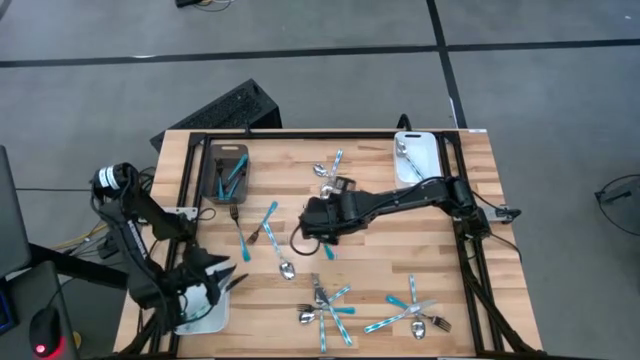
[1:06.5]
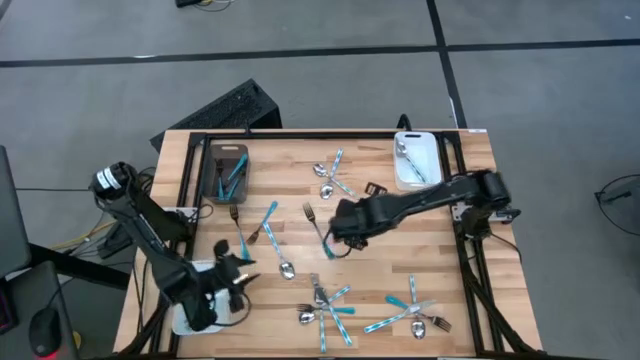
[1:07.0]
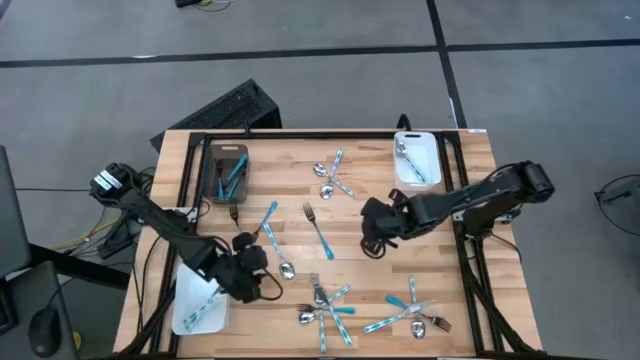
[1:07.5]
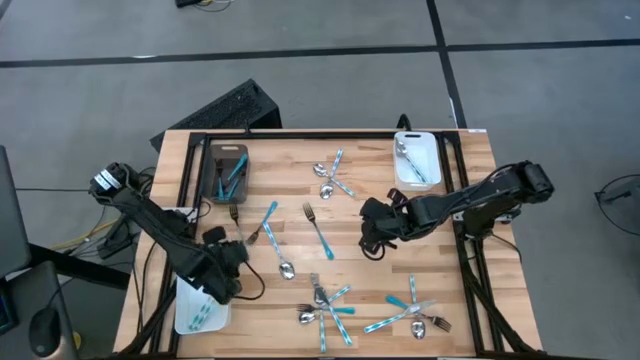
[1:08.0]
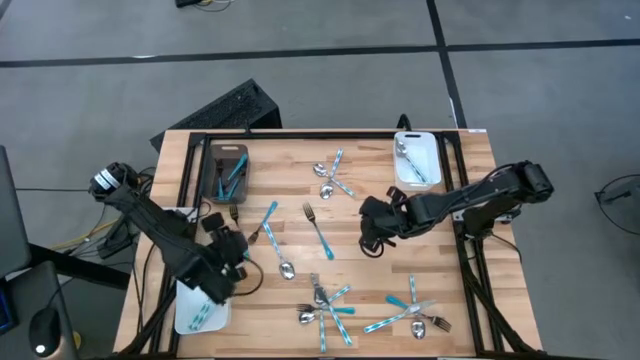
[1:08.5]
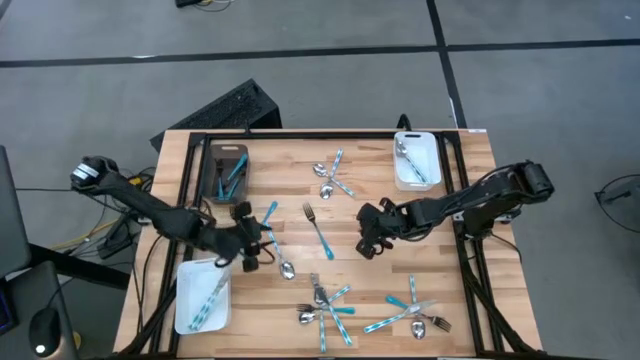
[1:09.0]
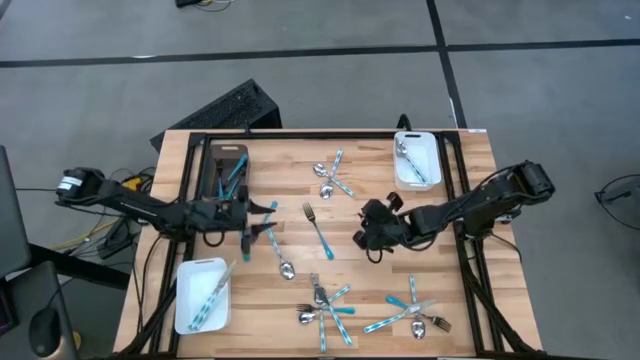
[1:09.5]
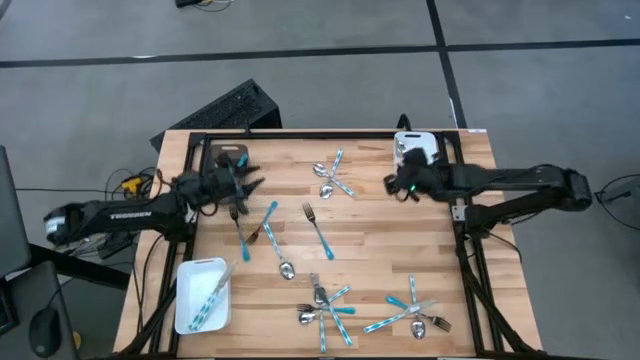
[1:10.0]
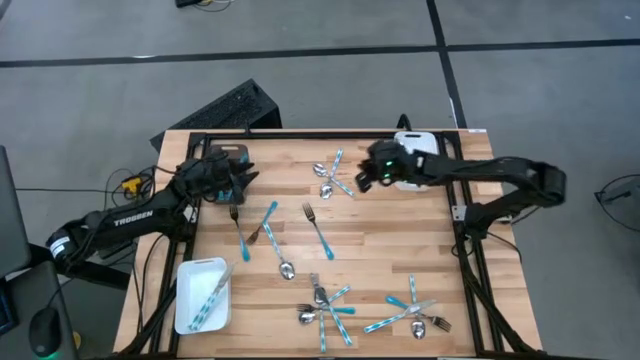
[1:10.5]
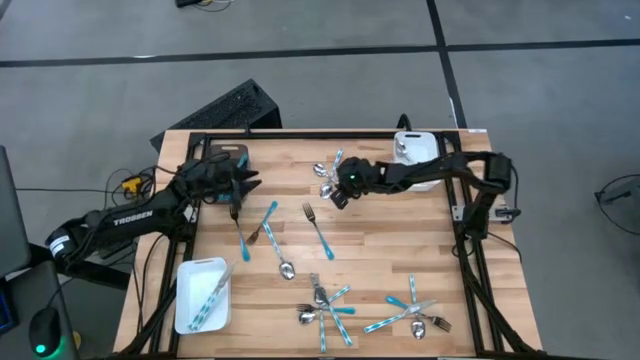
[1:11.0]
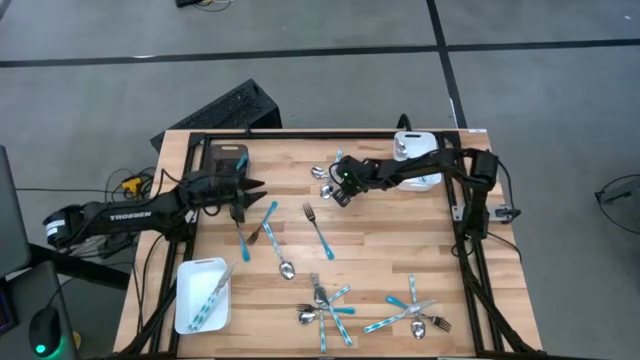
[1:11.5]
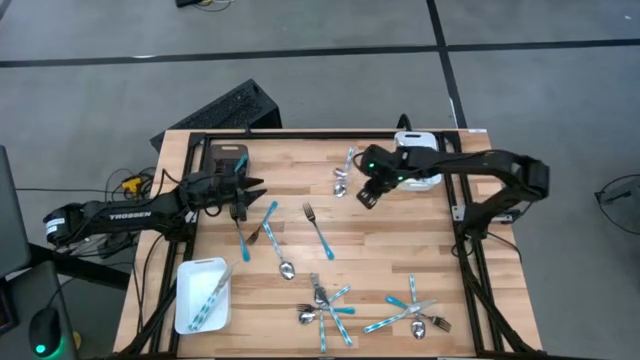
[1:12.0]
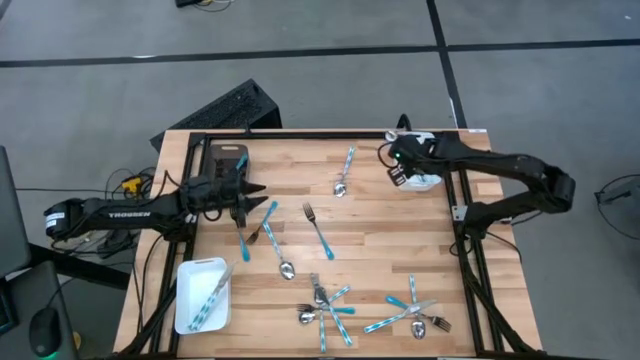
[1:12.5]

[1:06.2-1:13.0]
Task: Sort silverware by color (type)
Put the blue patterned spoon into the top right white bin

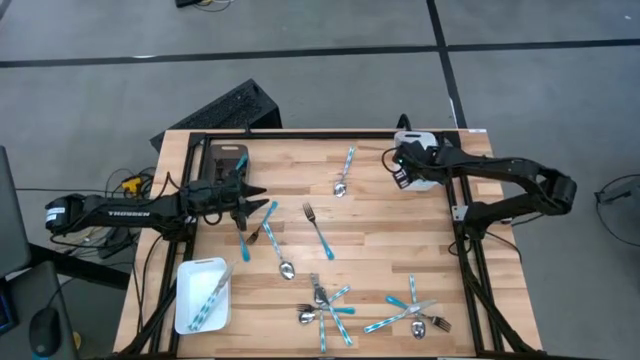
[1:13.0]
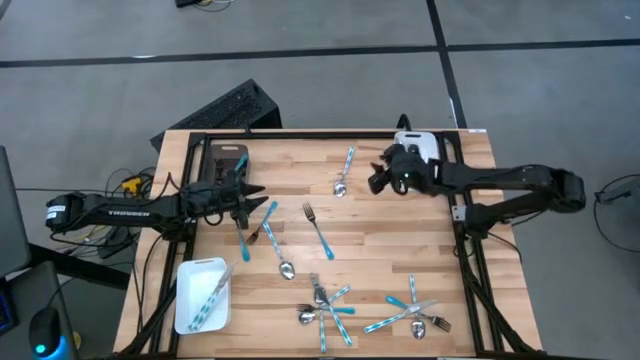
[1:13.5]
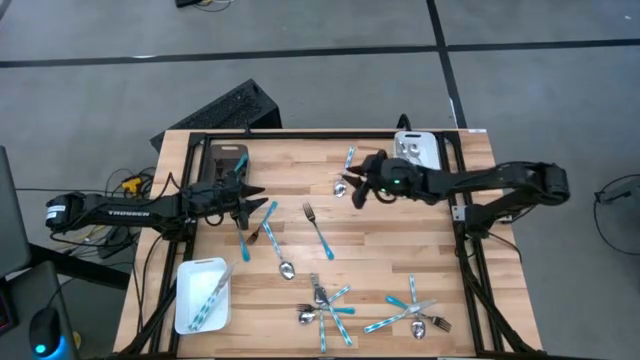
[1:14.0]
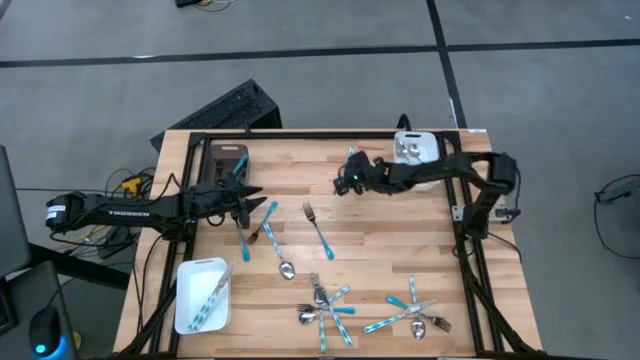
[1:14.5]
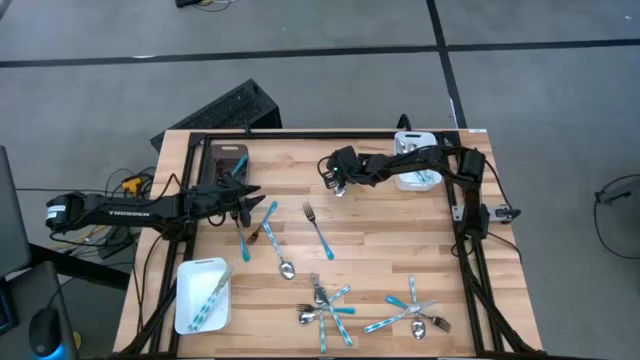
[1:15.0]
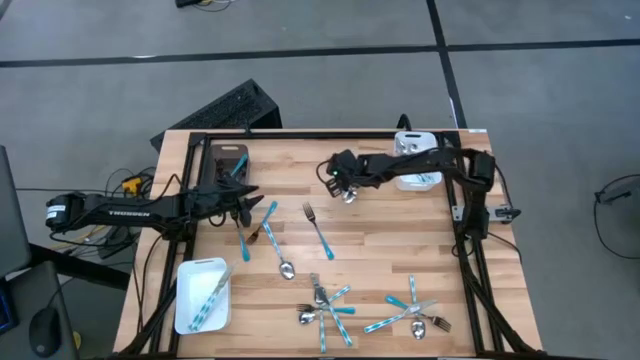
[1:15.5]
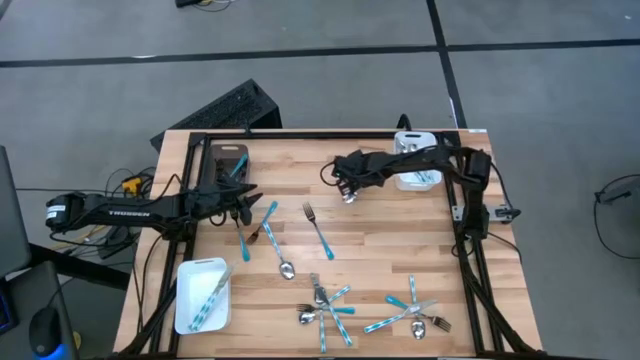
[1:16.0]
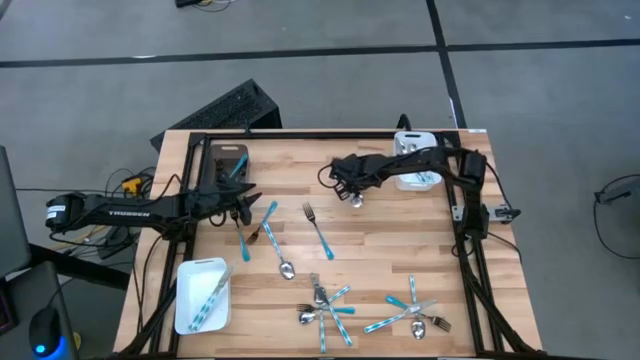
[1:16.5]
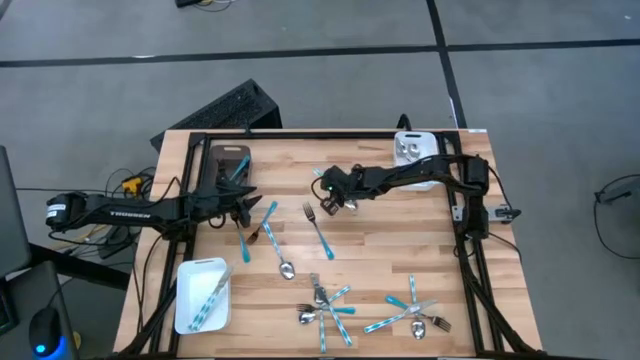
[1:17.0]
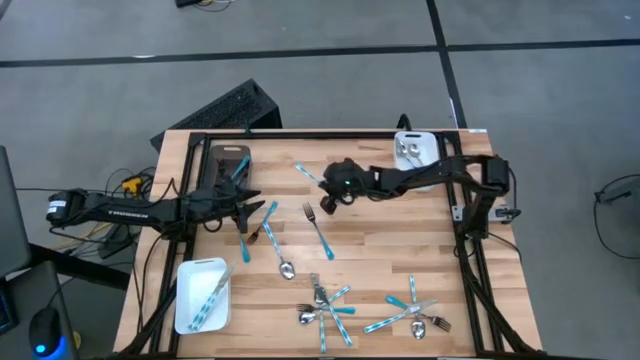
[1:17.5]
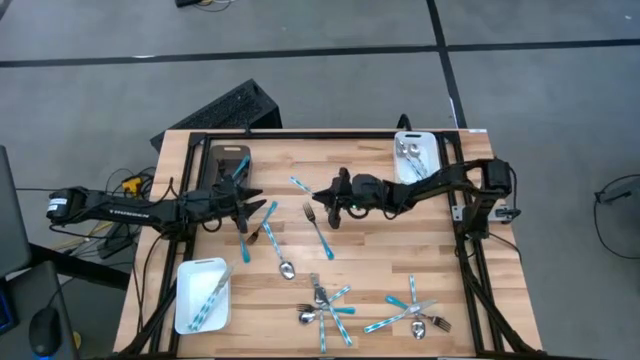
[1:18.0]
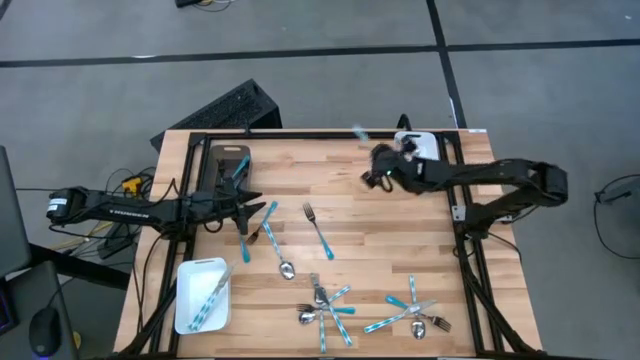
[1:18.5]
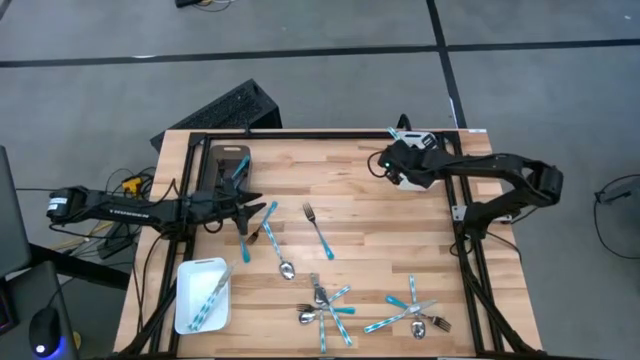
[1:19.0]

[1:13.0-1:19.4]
Put the blue patterned spoon into the top right white bin

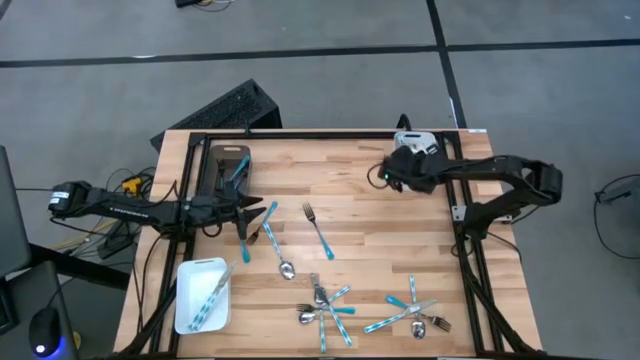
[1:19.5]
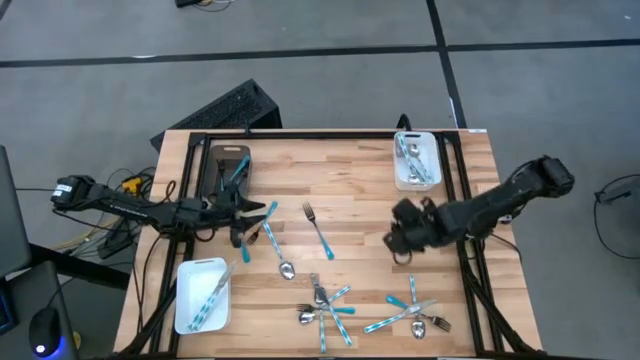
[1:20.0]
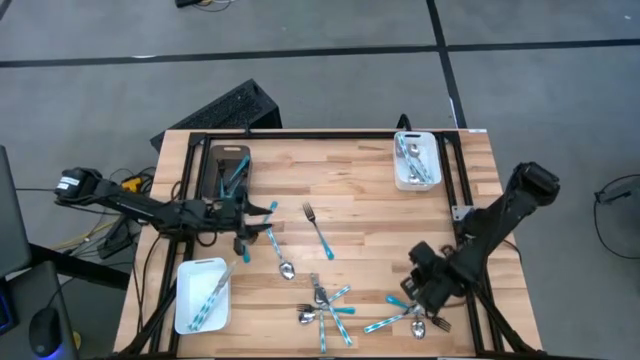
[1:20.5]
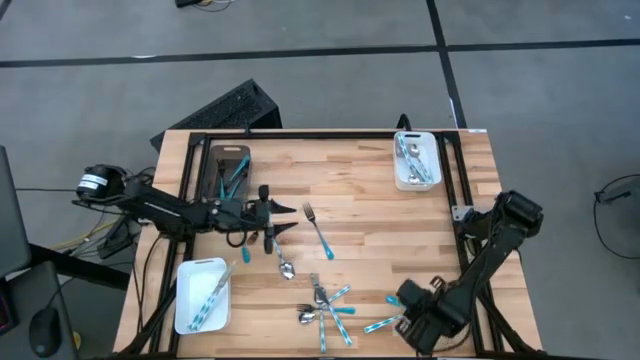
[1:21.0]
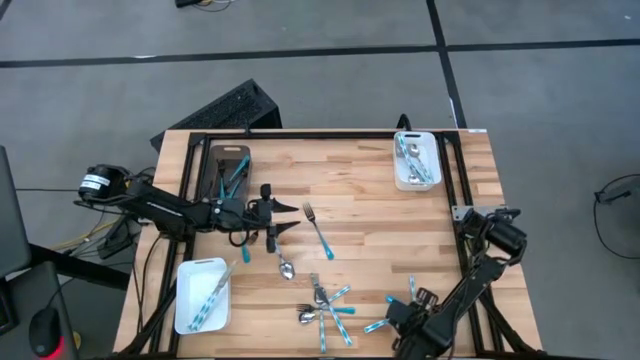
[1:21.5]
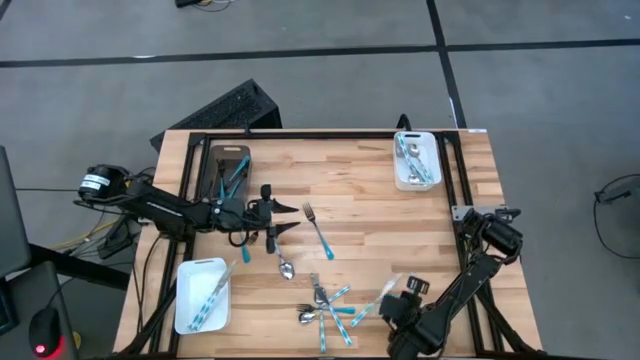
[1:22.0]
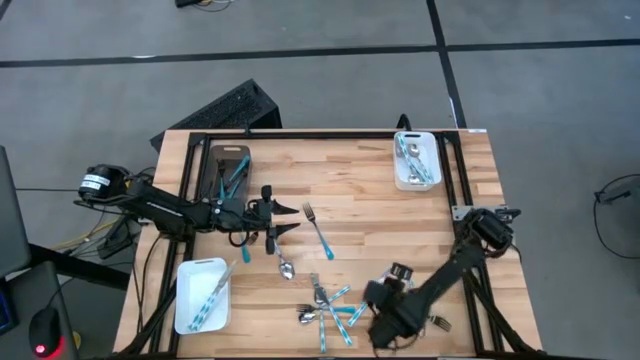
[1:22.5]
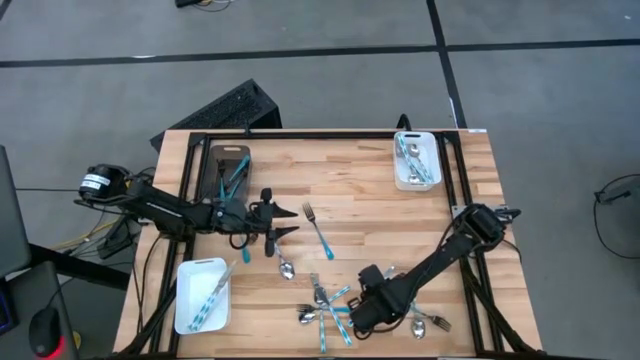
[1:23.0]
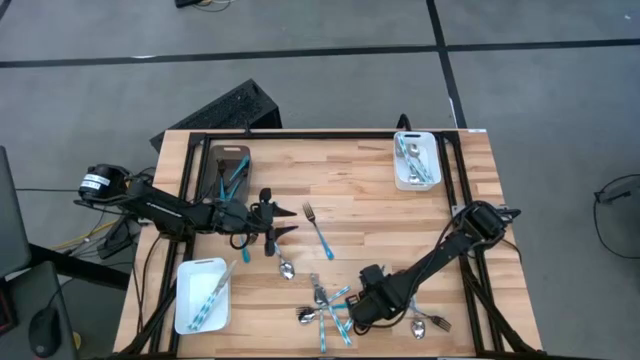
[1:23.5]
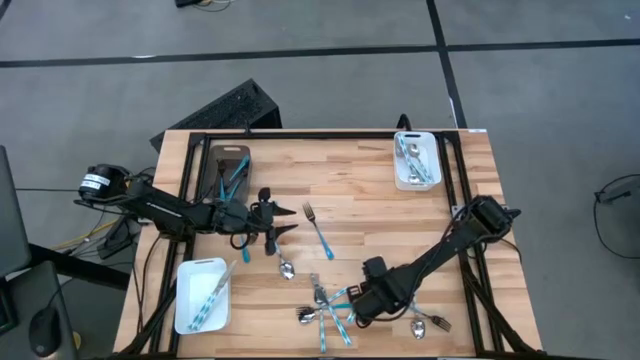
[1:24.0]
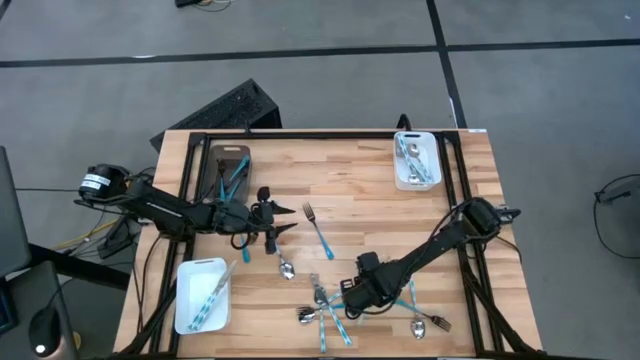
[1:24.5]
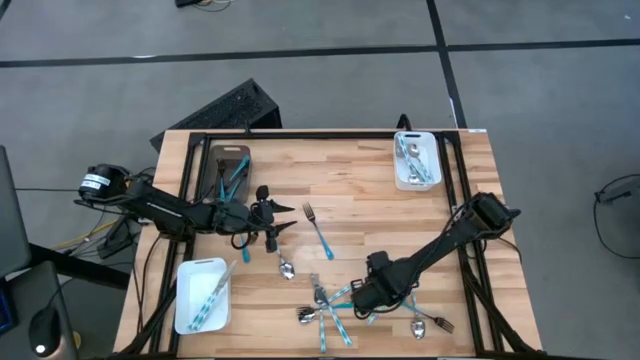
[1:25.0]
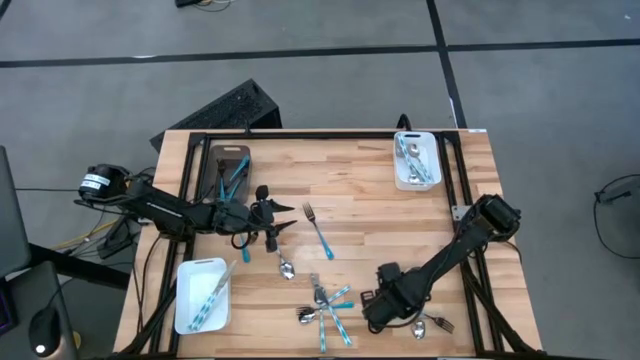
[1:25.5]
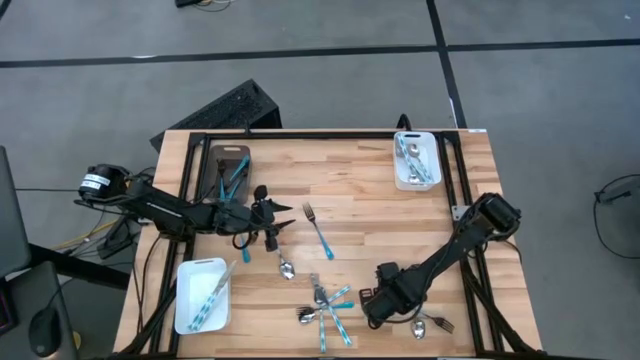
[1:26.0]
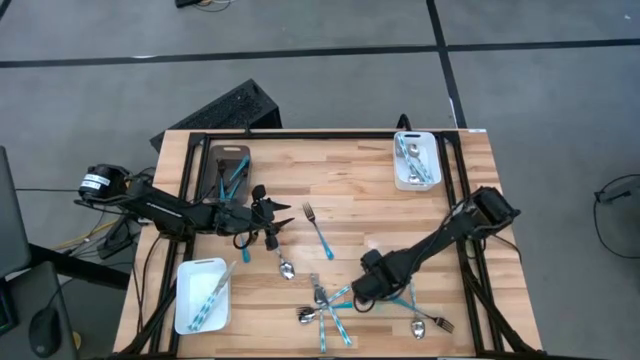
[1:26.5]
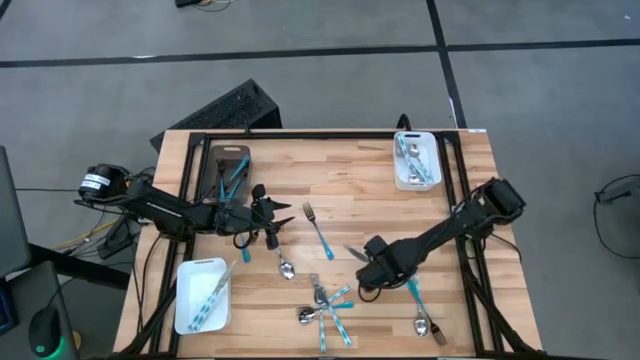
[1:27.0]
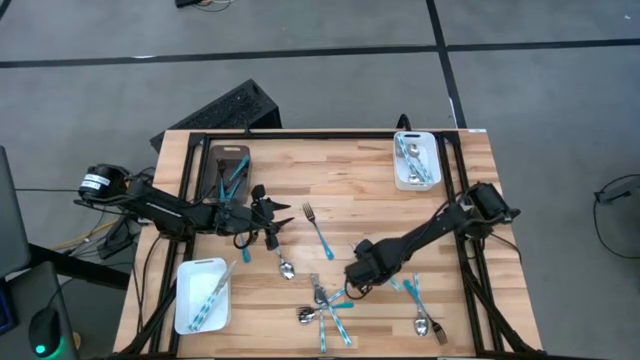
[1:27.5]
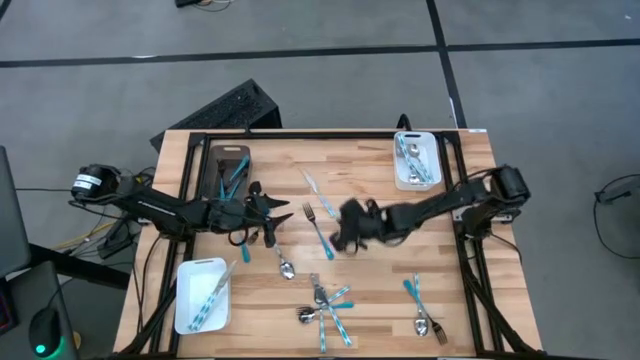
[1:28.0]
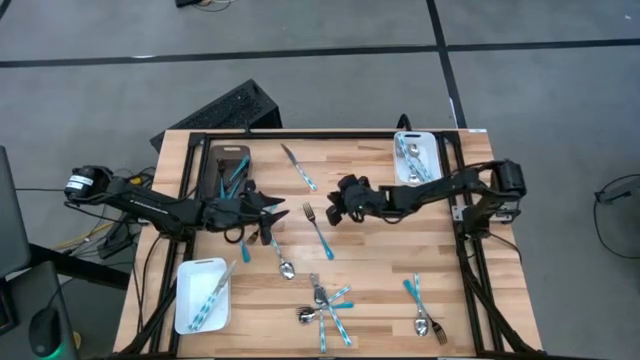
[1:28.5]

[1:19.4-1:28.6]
Put the blue patterned knife into the bottom left white bin
